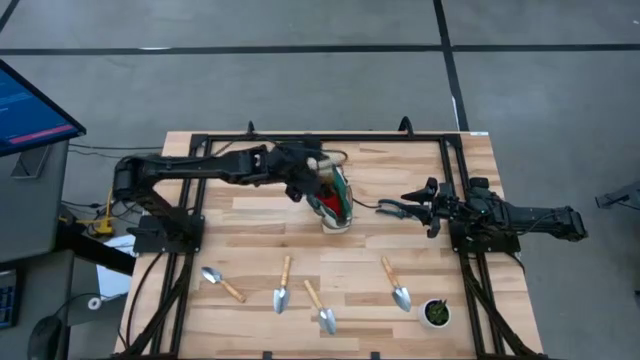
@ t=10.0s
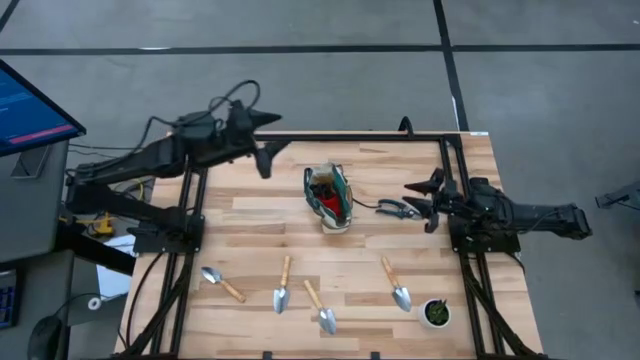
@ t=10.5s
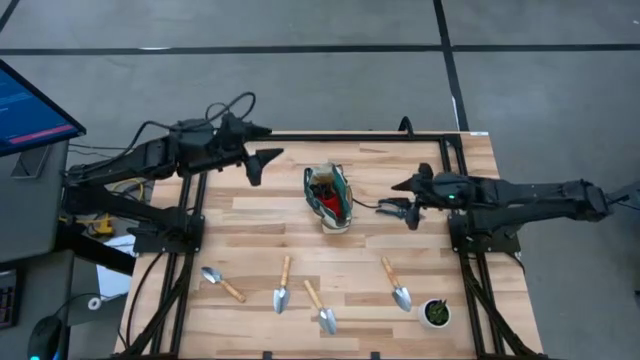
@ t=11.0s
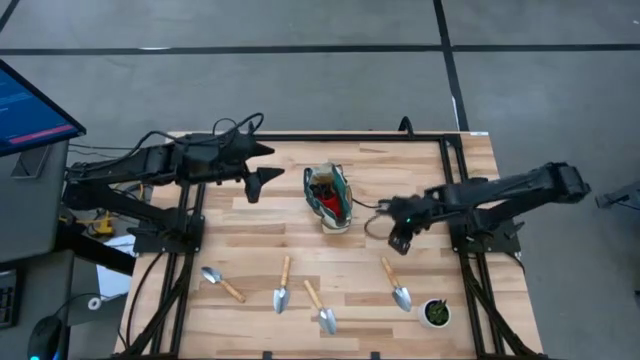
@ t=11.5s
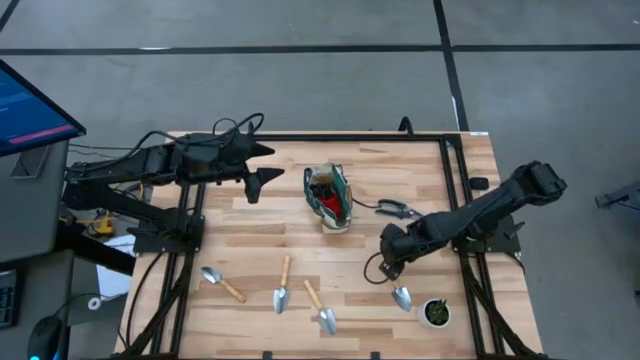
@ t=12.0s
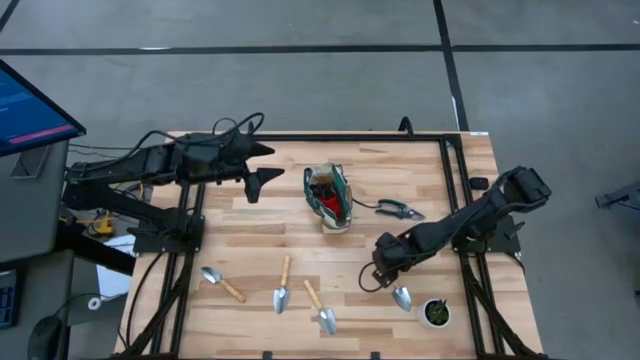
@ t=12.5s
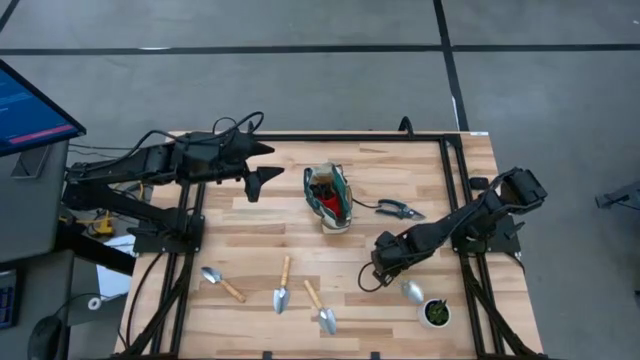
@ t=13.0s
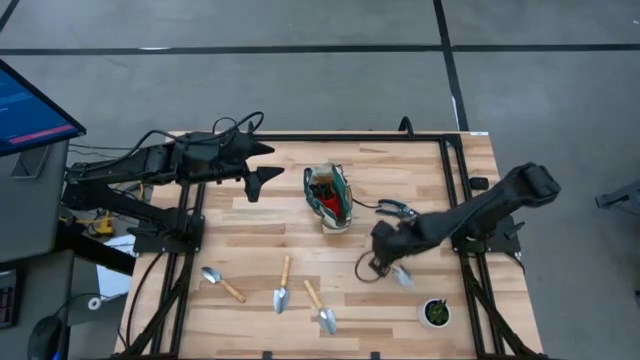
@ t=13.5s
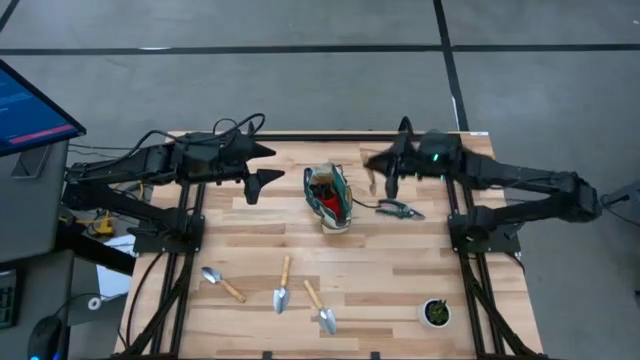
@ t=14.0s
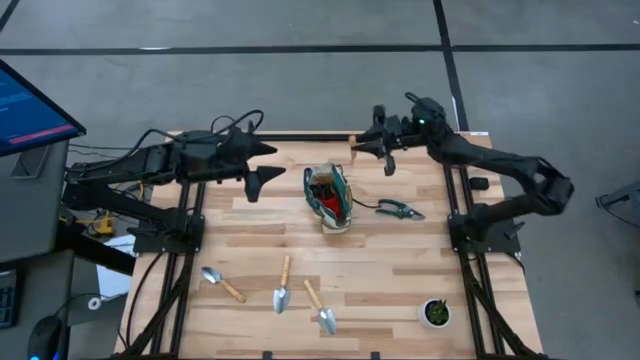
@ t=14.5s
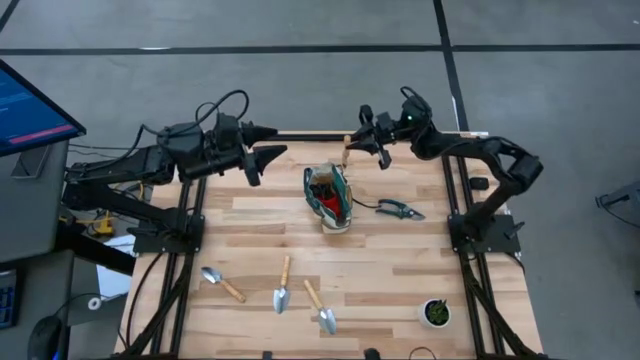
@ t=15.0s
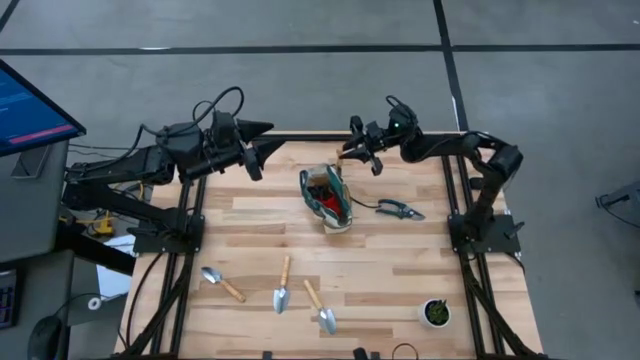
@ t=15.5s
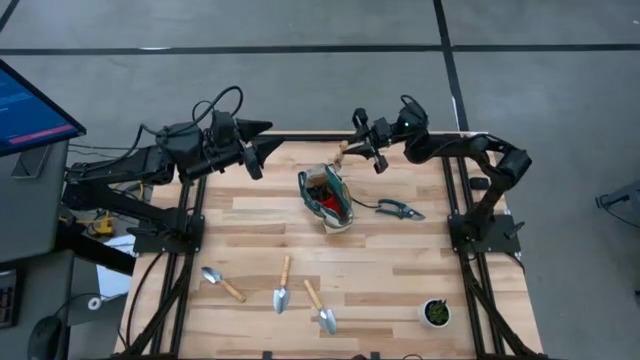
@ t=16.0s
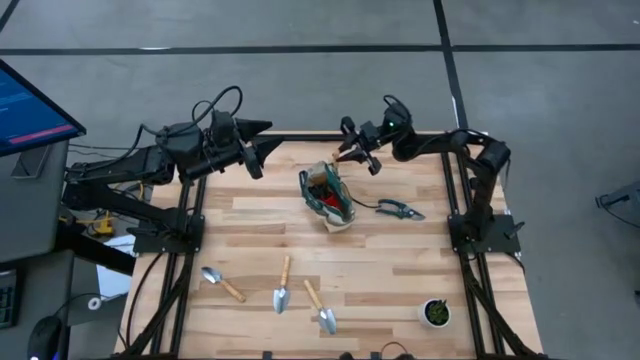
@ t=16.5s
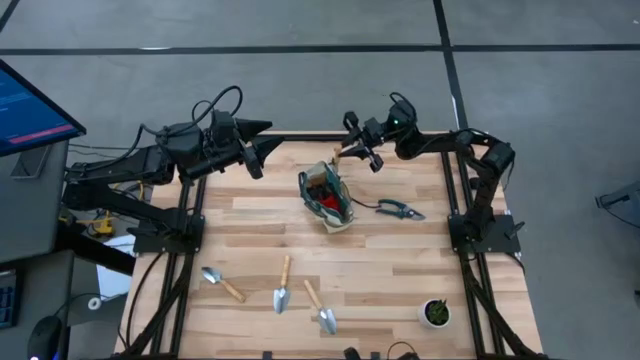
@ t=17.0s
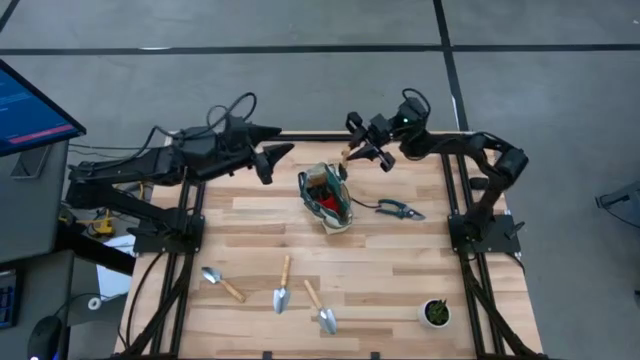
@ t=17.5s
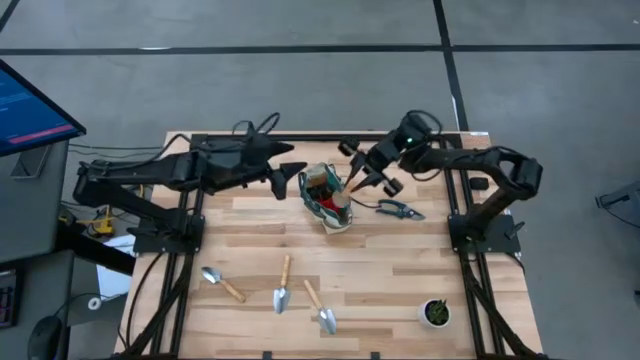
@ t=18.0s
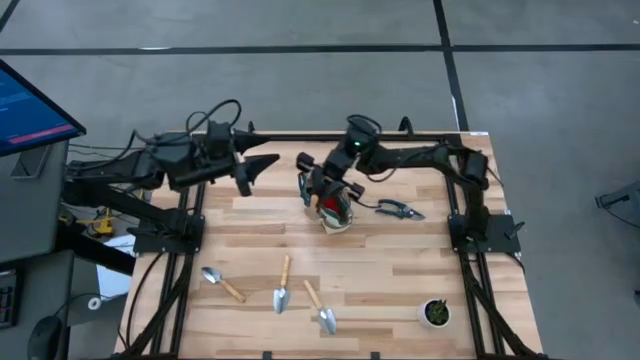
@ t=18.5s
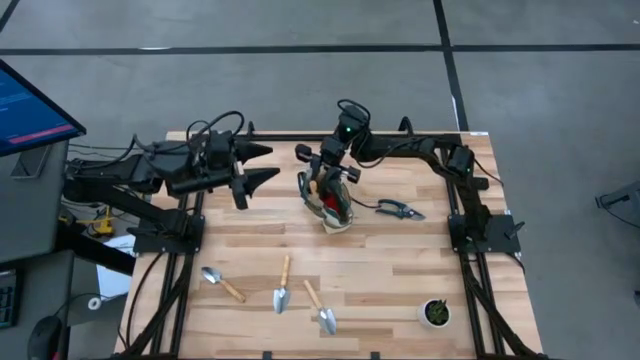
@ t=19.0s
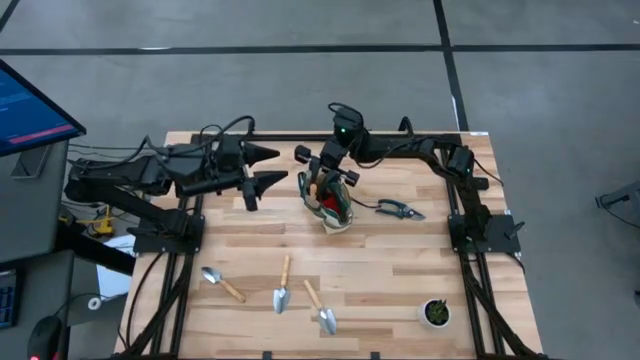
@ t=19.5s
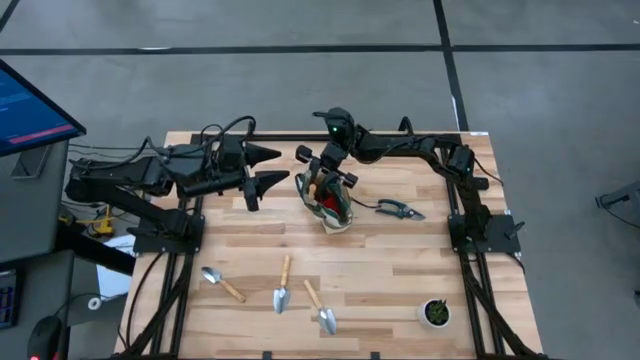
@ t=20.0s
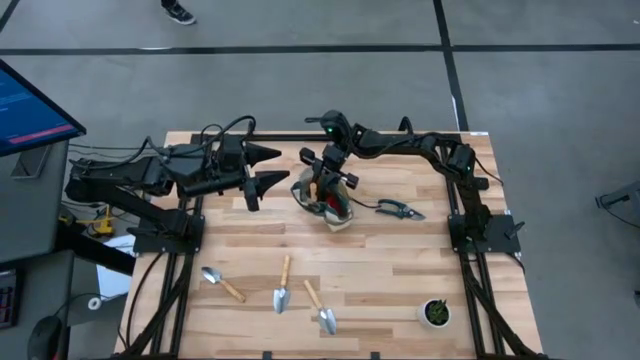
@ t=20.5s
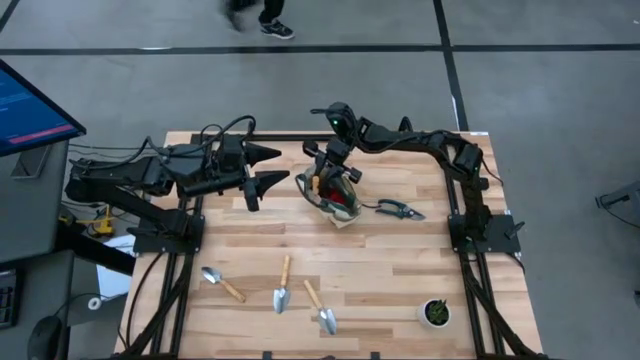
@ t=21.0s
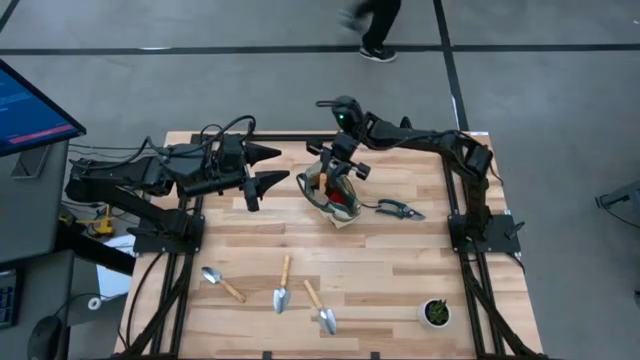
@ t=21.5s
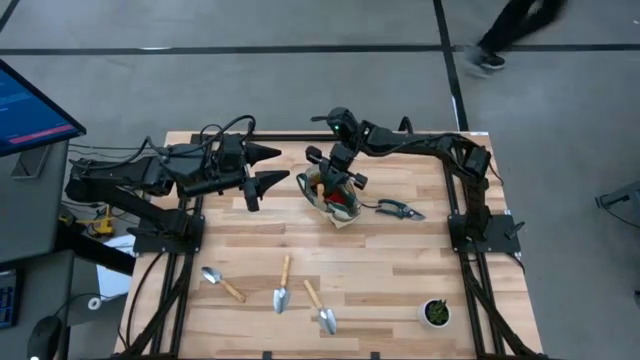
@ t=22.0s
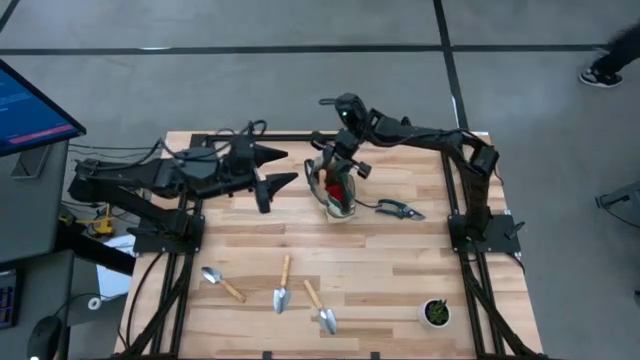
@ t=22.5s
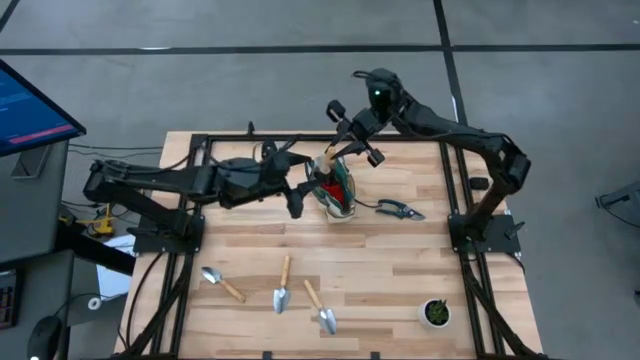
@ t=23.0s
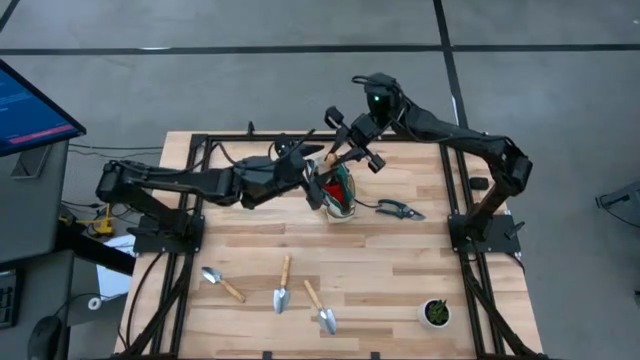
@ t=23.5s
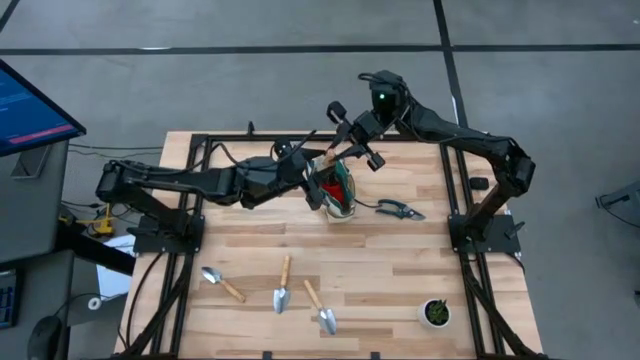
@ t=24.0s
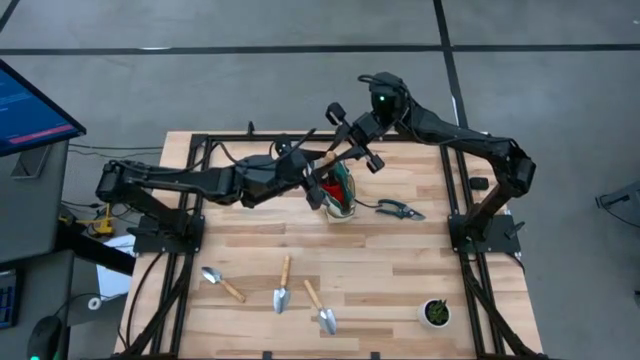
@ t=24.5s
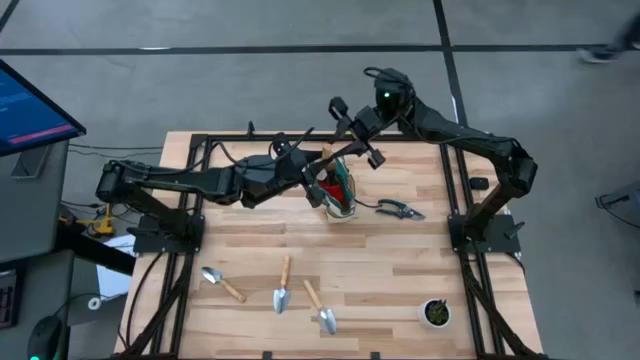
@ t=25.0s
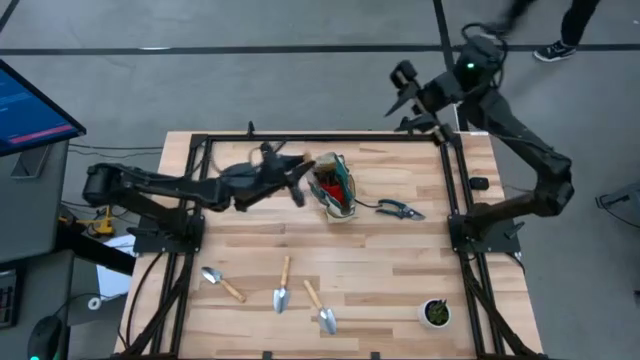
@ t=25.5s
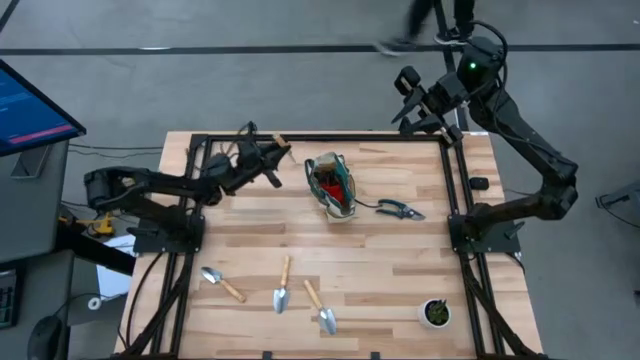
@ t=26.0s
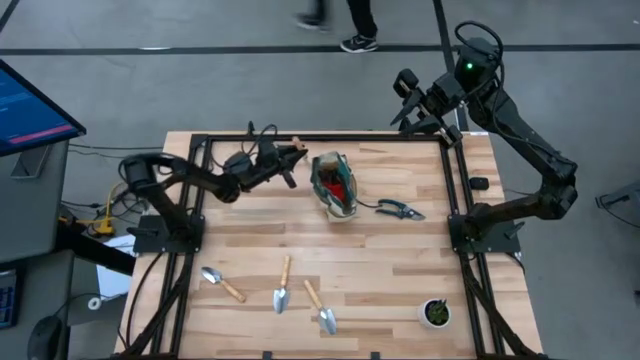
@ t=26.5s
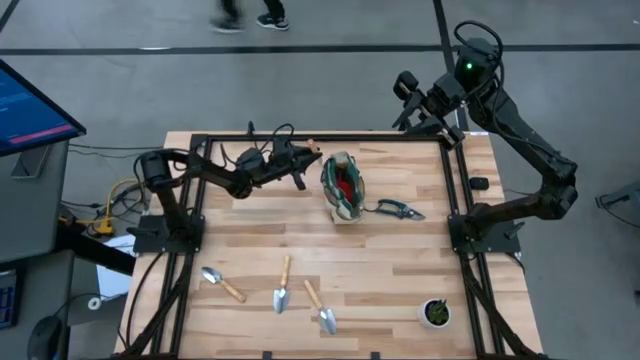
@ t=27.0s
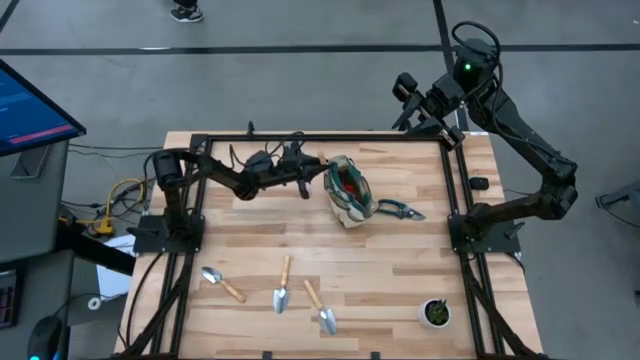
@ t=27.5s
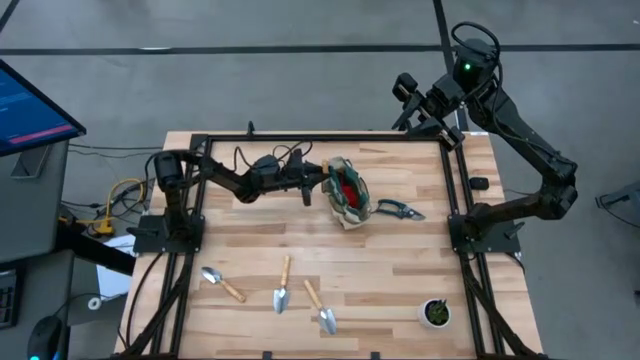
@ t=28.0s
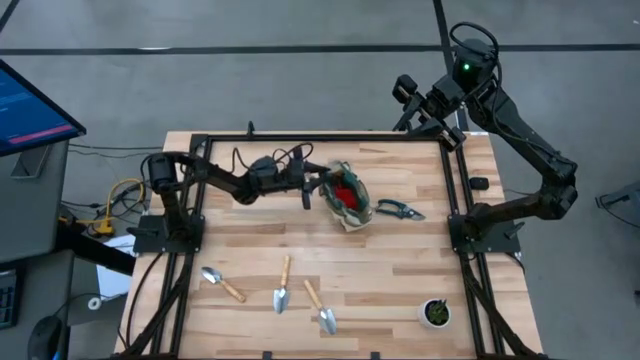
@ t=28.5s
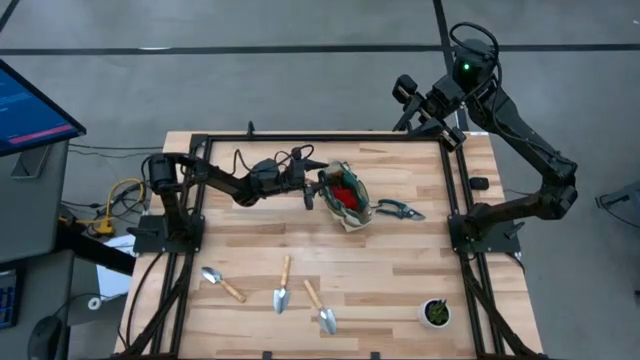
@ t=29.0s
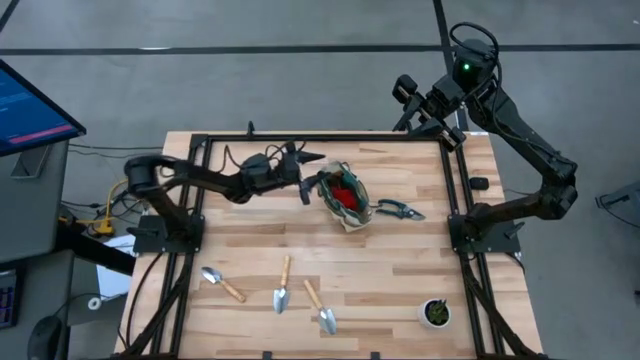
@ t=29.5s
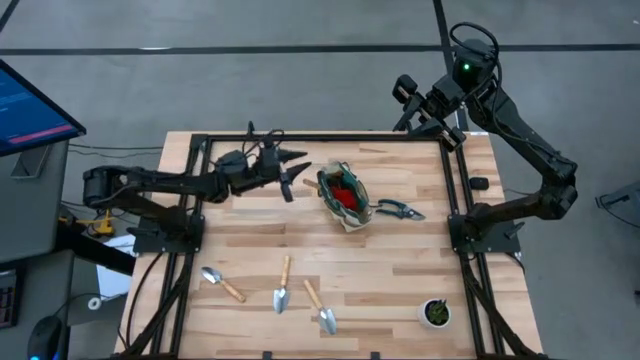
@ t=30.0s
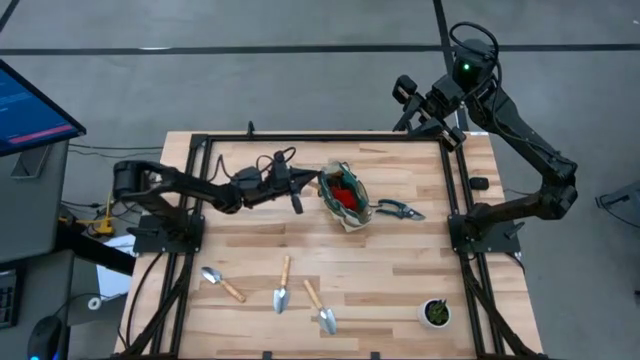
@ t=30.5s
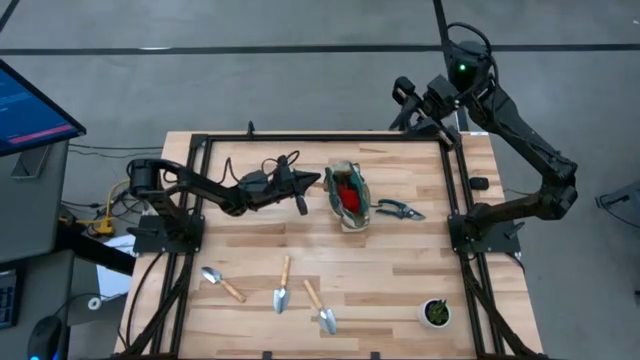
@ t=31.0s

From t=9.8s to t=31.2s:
Task: Pick & Place Garden tools in Gardening bag
Put the trowel into the gardening bag
